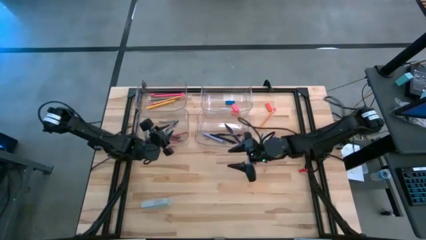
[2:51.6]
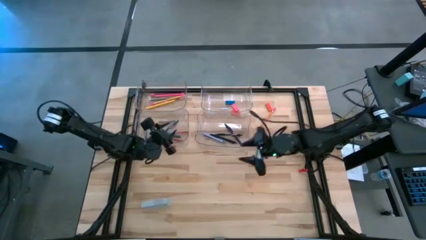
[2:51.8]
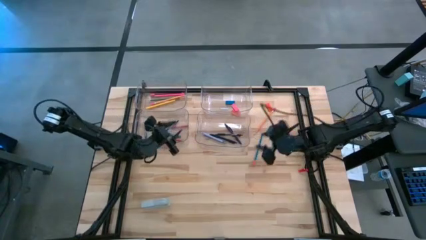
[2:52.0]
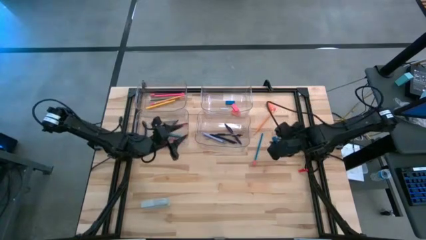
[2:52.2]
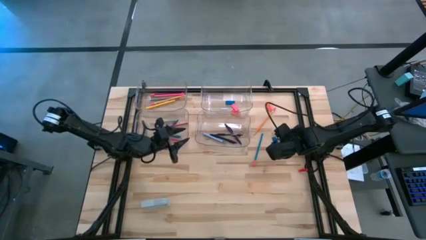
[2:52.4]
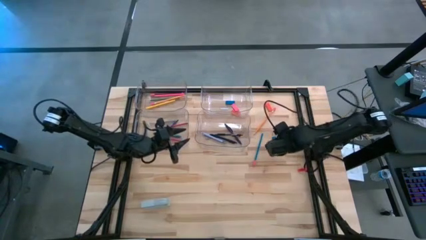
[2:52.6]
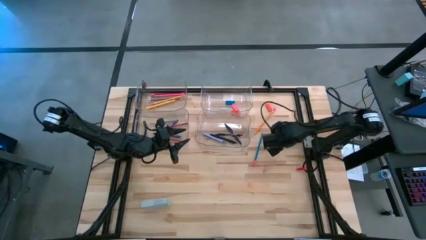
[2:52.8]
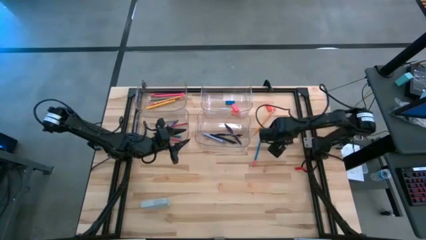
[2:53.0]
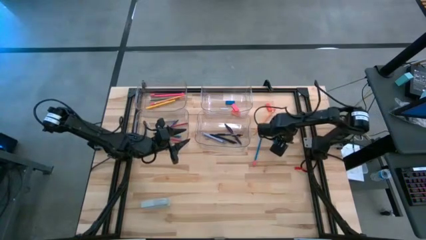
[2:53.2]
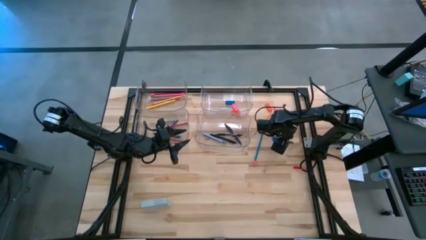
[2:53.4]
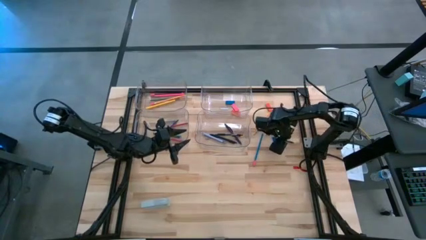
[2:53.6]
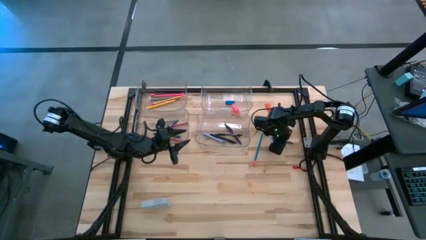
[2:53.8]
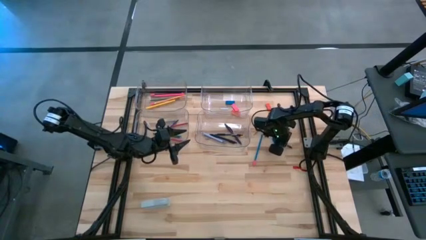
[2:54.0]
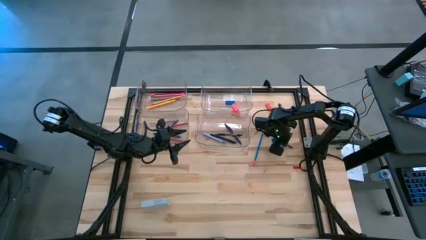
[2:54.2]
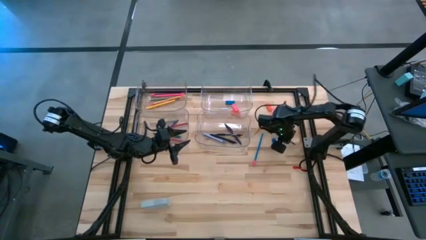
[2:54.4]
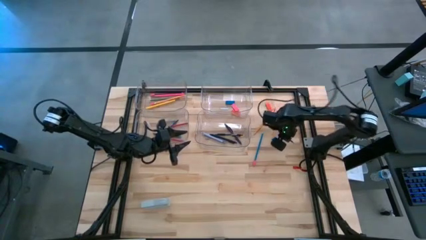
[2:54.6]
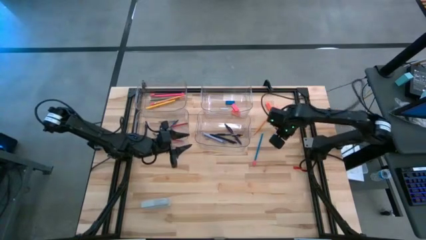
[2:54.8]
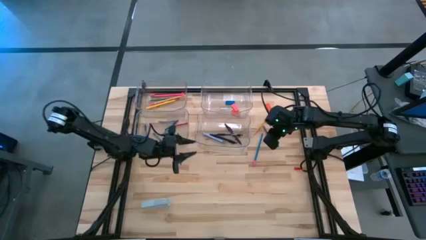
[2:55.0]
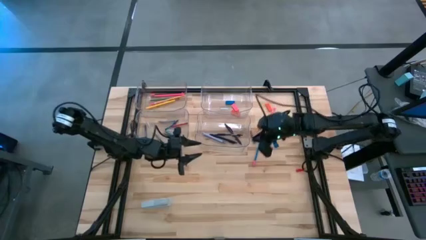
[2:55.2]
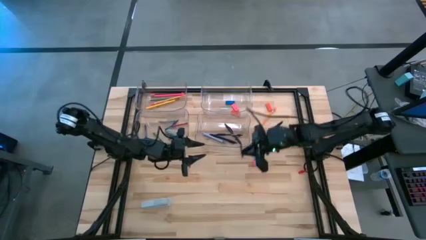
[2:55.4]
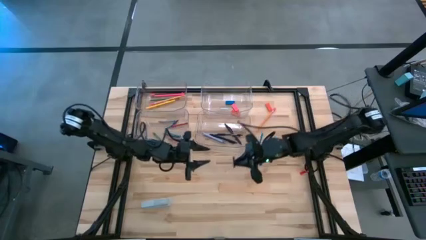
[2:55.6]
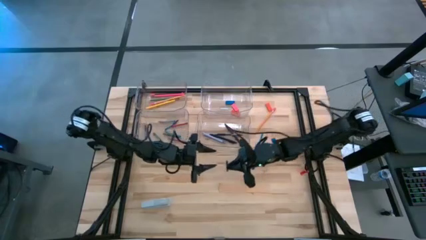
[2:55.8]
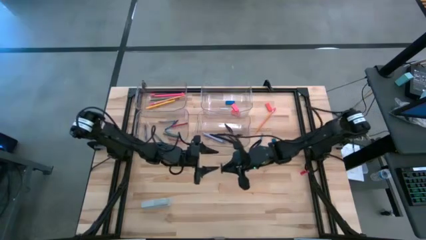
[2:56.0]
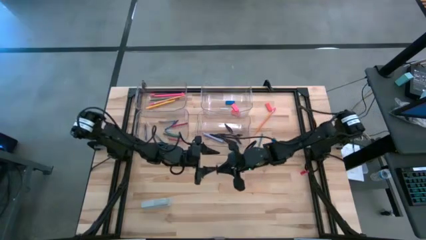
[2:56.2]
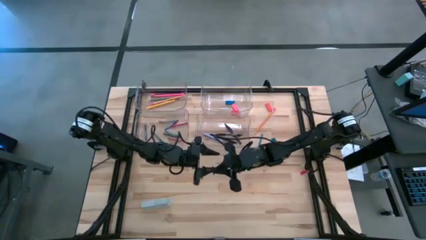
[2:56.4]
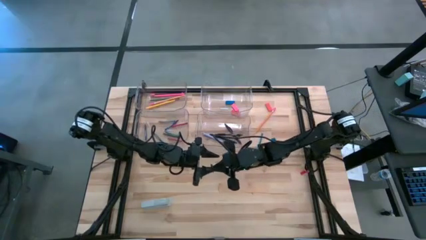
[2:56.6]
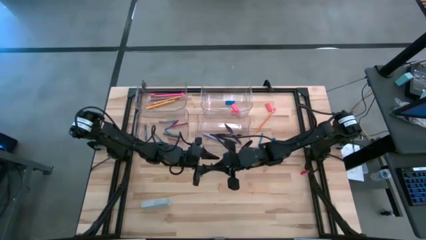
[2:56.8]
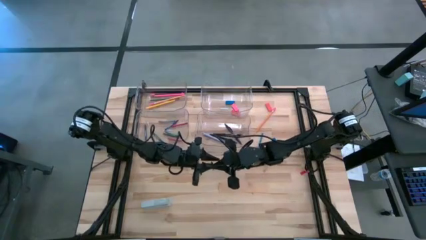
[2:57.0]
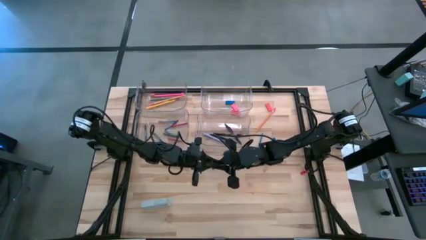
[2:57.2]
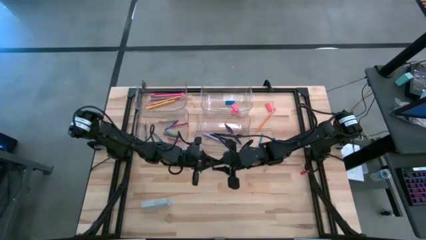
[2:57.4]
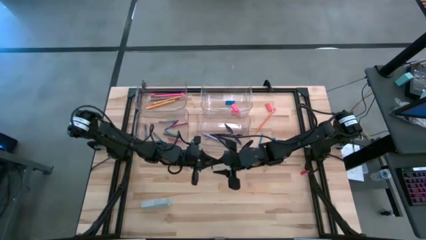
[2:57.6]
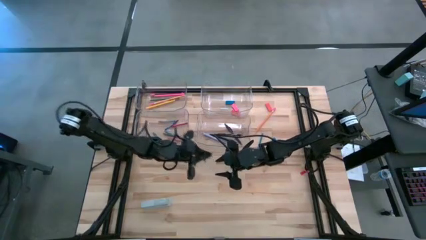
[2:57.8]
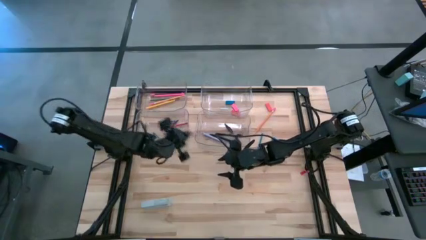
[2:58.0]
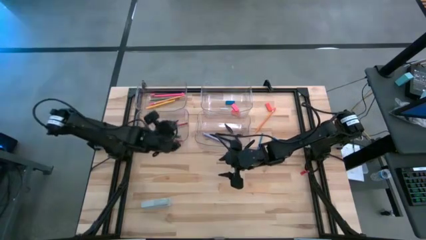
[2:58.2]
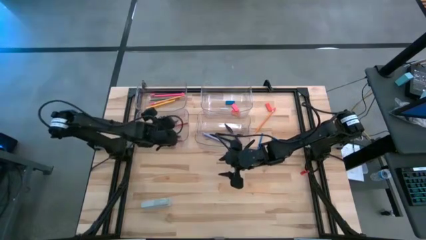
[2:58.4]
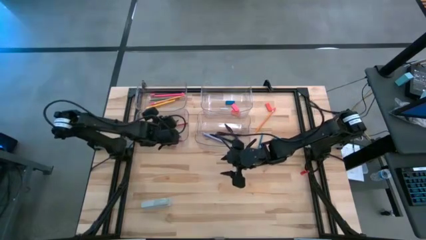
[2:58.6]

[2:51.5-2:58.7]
Task: Sort crayons/erasers/pens/pencils in bins
Put the blue crayon into the bottom left transparent bin

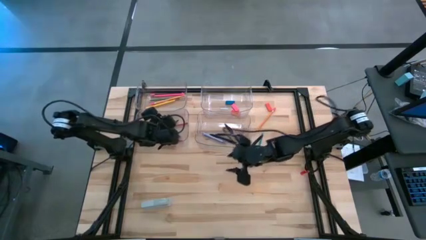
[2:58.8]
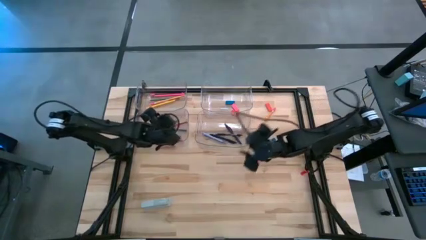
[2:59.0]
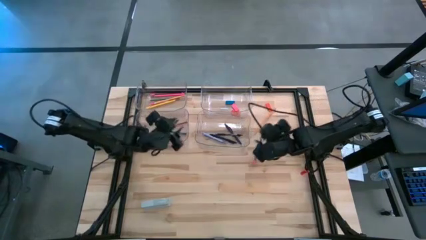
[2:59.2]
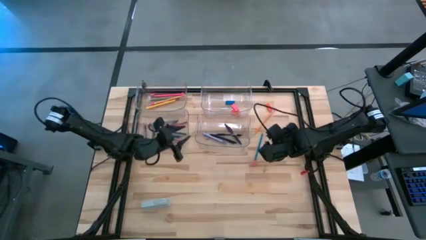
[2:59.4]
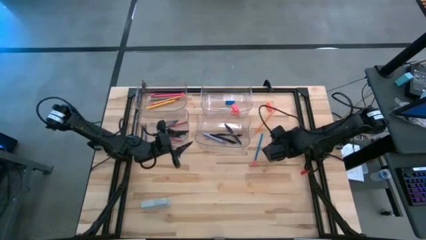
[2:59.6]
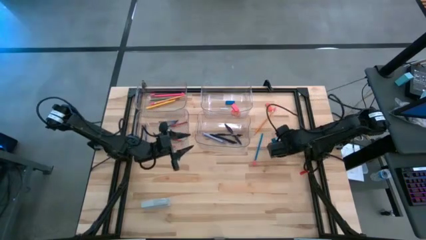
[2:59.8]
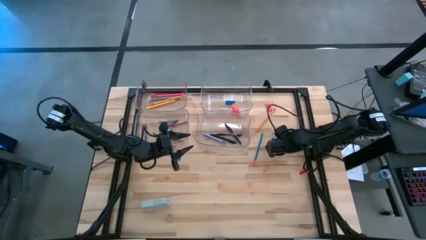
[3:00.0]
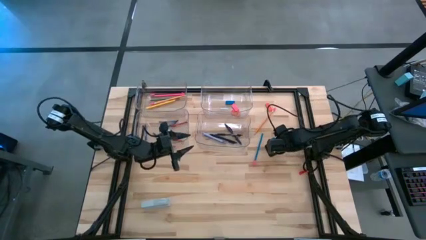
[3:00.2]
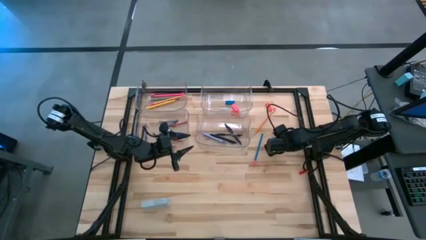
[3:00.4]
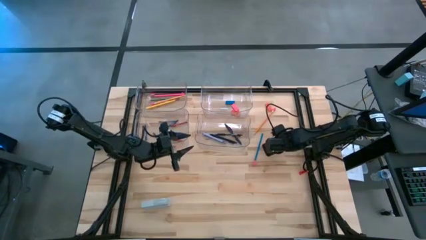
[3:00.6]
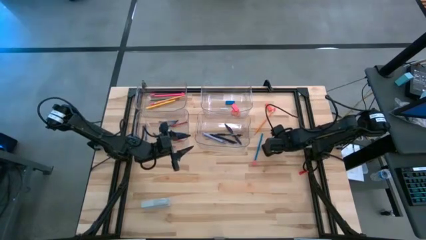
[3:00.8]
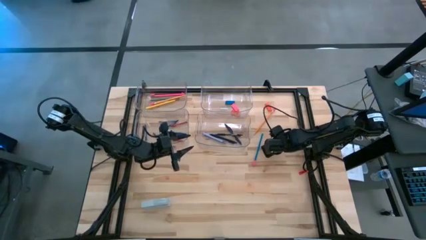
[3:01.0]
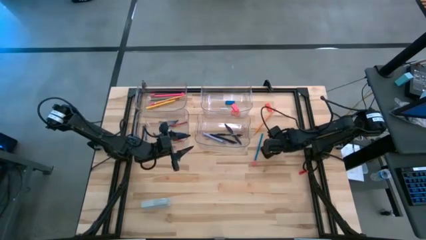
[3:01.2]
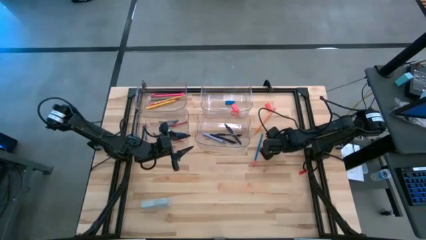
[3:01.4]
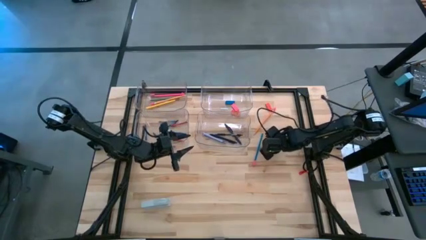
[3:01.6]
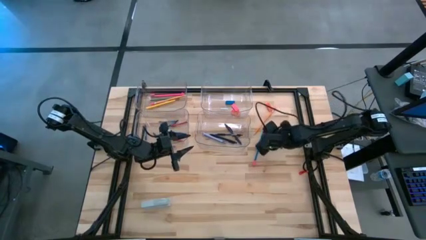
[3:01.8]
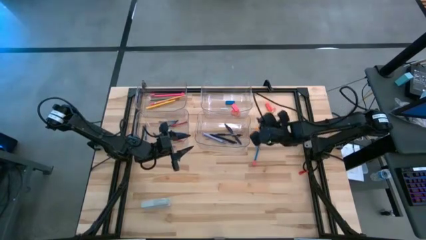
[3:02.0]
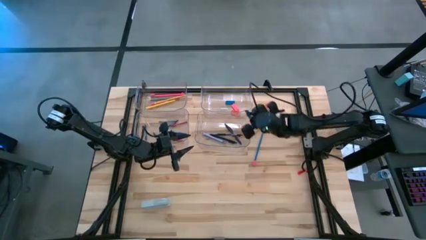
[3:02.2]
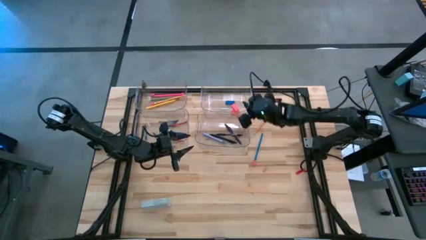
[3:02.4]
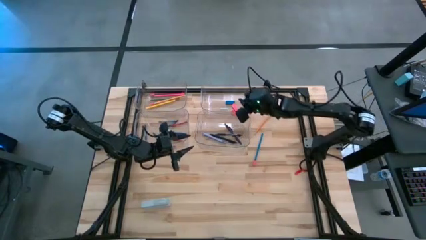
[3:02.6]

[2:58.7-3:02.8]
Put the blue eraser into the top right transparent bin

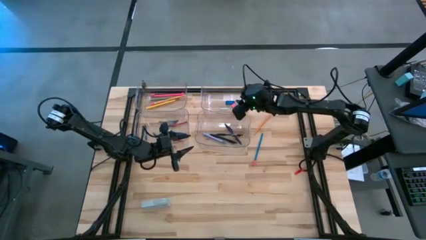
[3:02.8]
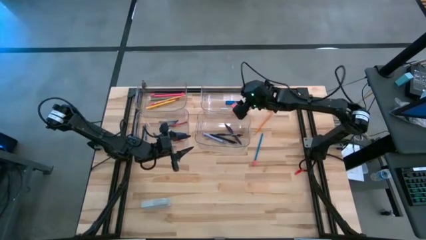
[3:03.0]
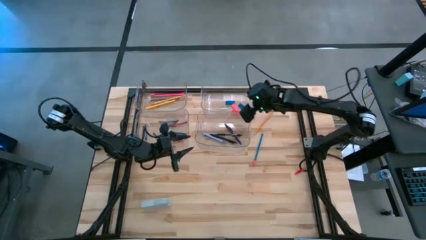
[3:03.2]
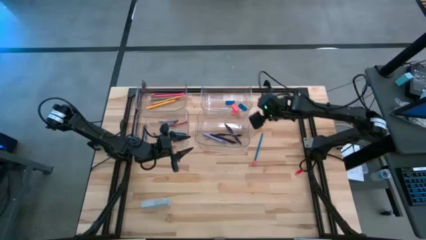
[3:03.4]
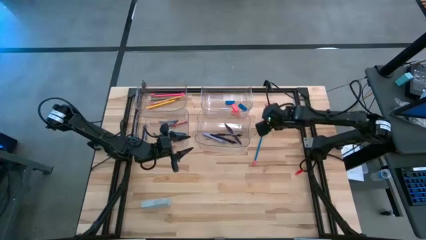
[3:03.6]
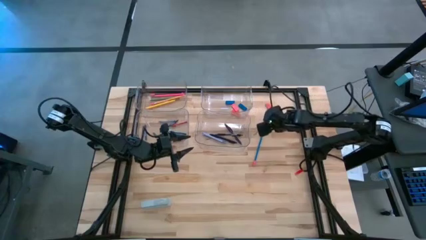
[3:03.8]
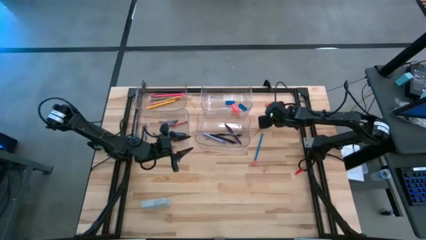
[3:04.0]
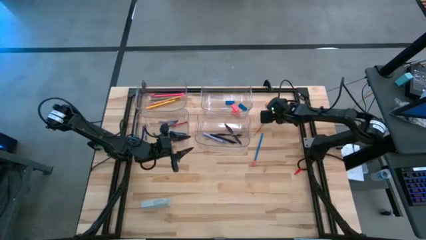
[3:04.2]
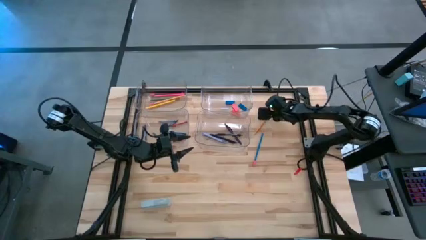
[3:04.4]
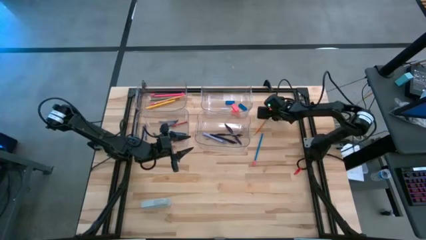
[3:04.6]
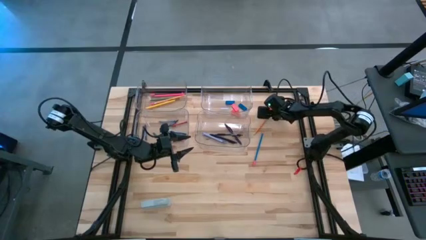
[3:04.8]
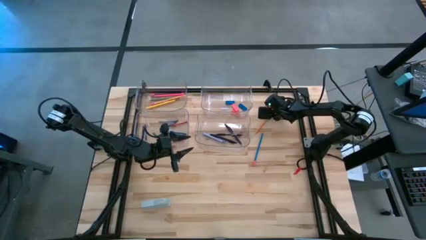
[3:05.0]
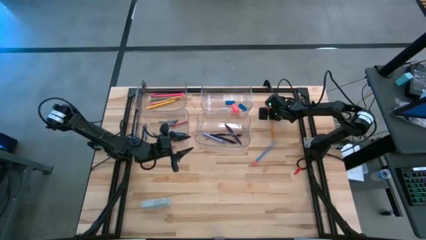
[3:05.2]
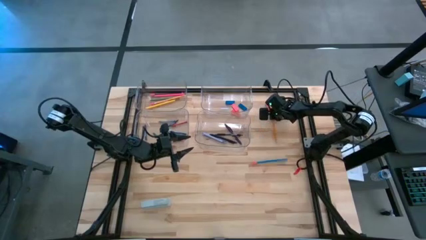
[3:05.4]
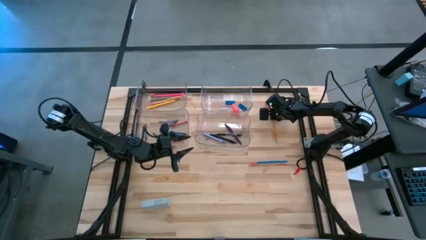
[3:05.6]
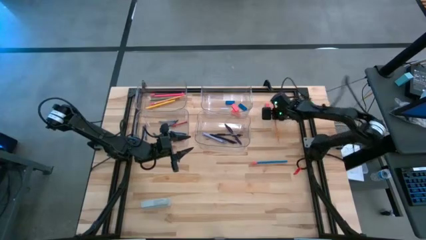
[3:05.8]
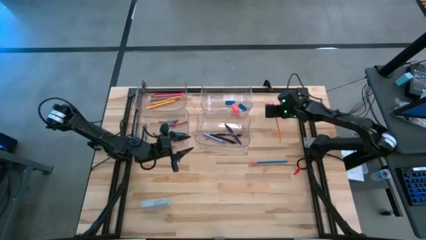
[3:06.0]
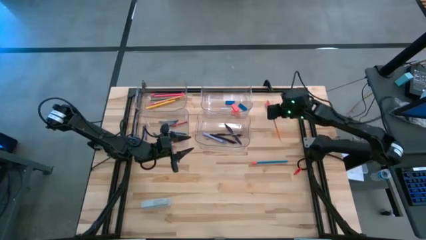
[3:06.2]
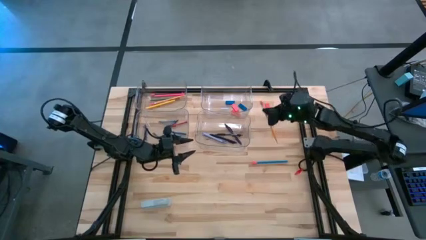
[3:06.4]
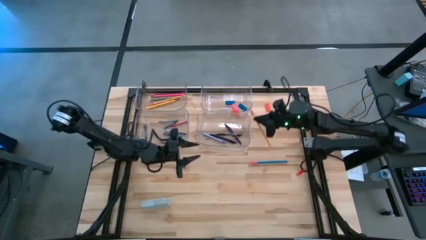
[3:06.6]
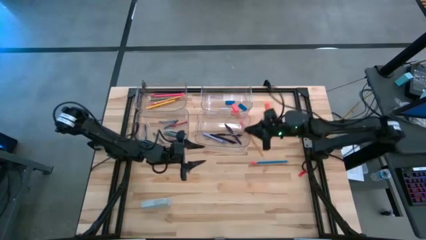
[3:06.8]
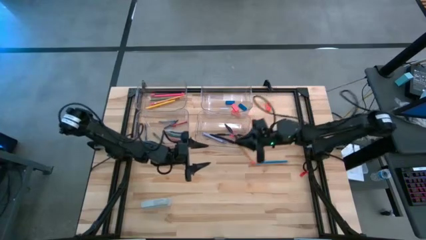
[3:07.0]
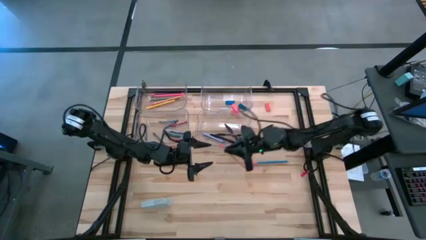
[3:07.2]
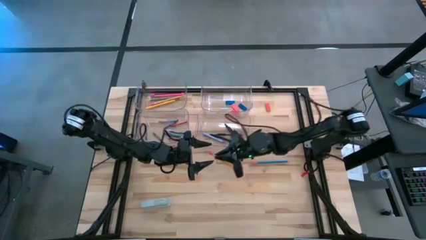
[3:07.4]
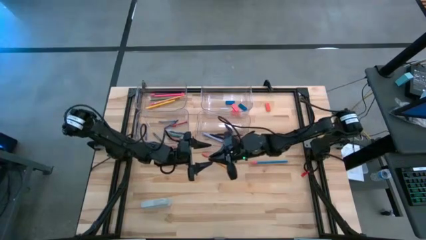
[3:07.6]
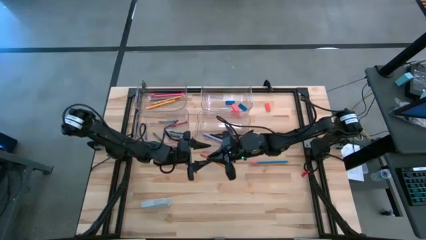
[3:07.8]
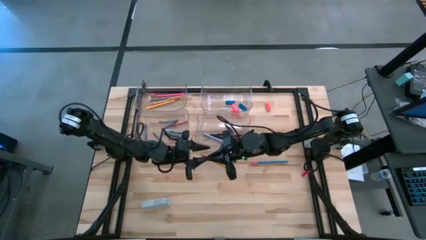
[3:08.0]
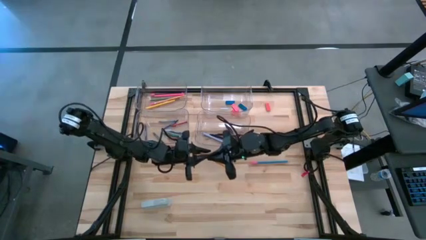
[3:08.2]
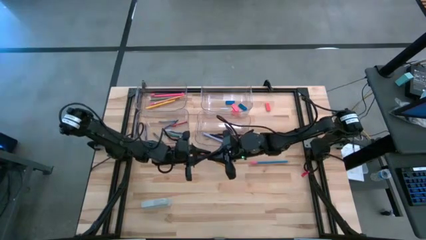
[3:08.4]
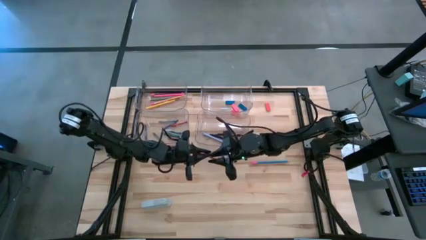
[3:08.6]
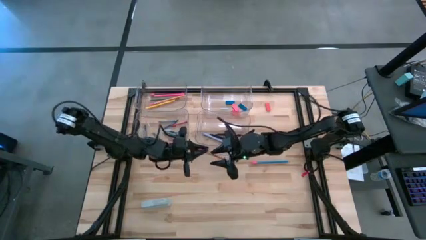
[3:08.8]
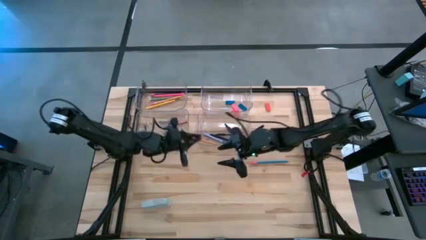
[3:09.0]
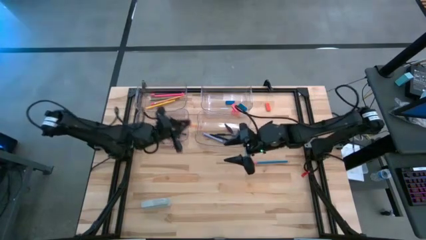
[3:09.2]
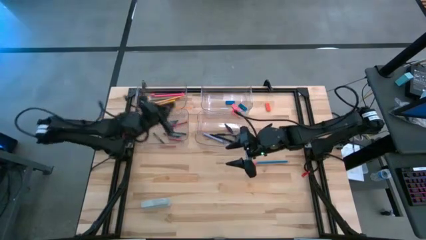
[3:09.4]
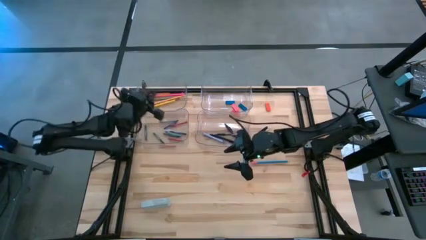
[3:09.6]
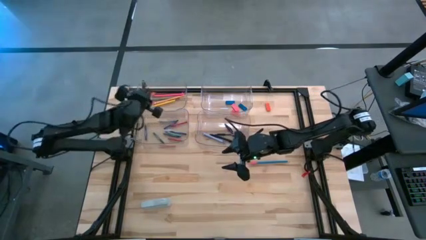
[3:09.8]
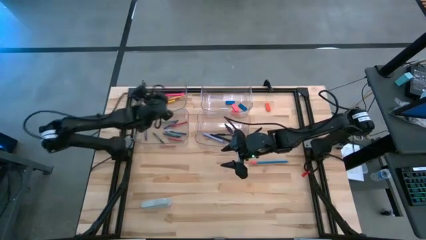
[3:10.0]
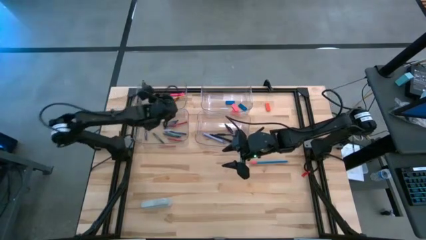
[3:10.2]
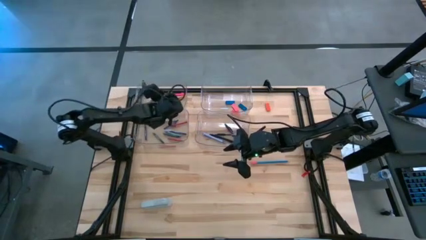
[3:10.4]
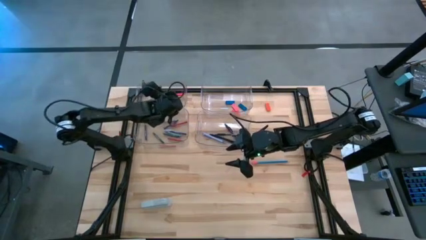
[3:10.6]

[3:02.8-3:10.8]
Put the orange pencil into the top left transparent bin
